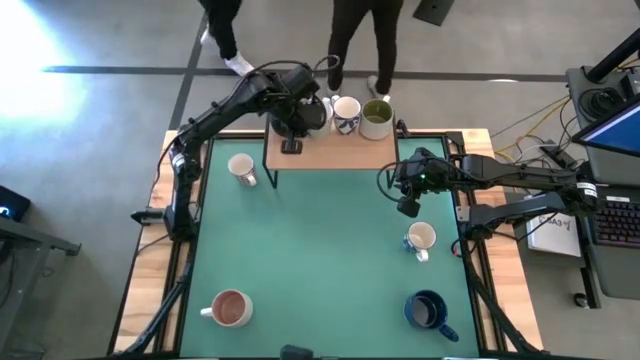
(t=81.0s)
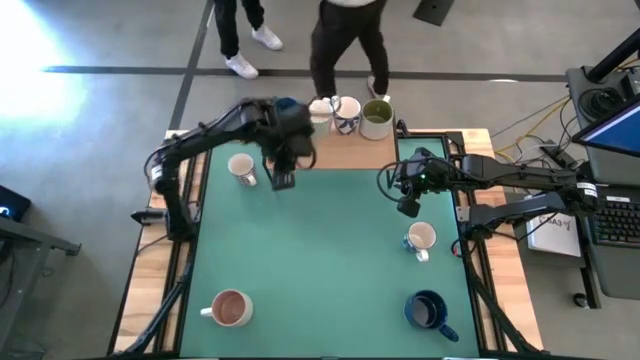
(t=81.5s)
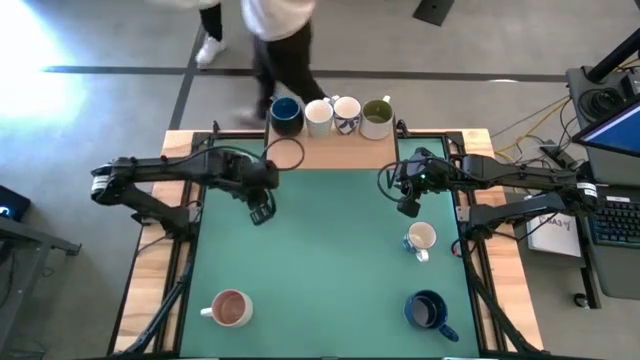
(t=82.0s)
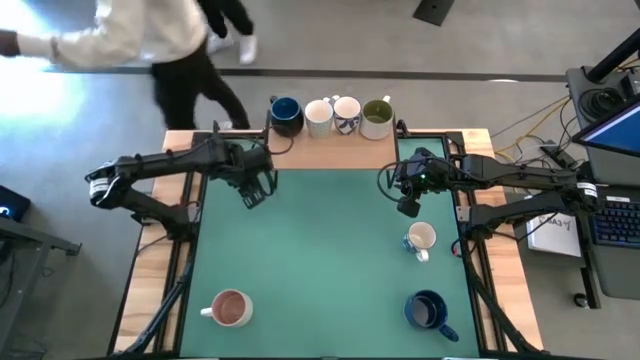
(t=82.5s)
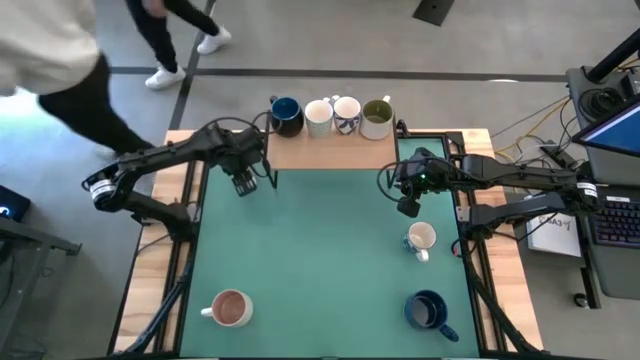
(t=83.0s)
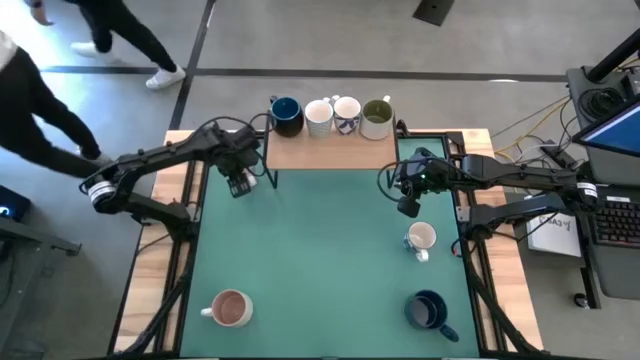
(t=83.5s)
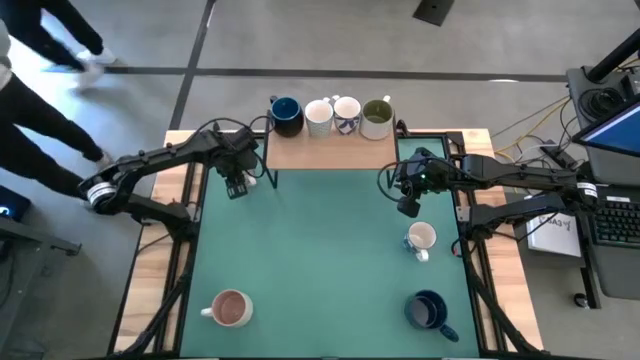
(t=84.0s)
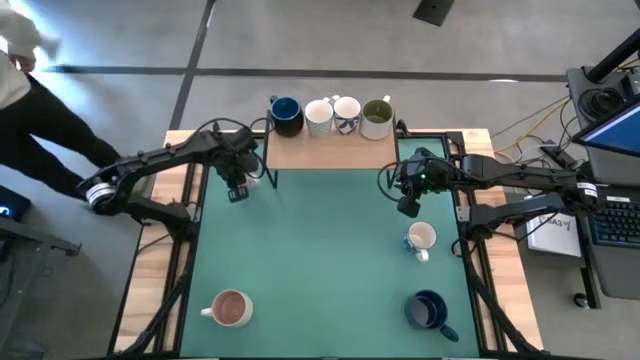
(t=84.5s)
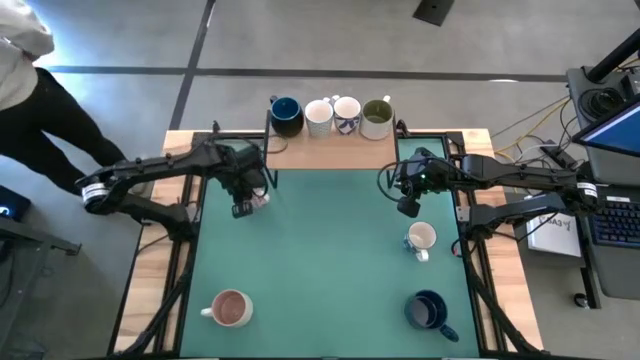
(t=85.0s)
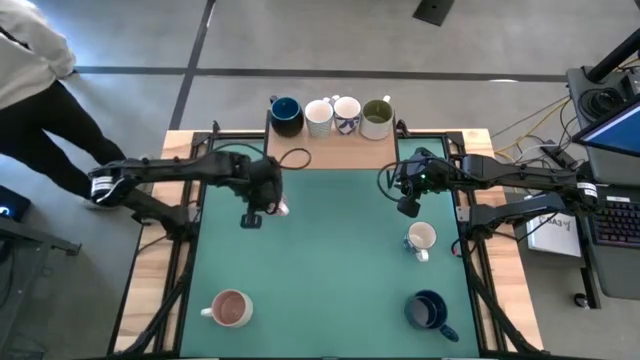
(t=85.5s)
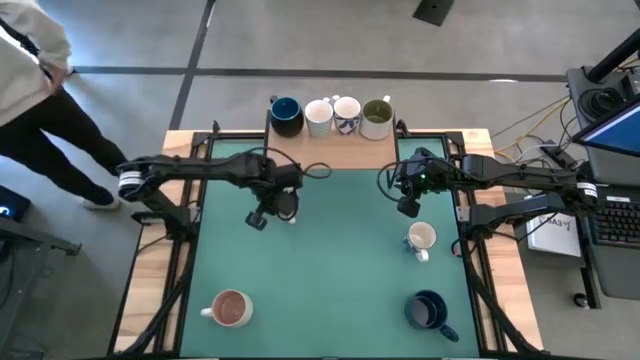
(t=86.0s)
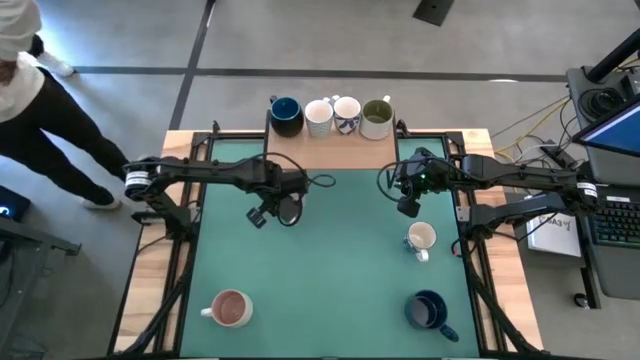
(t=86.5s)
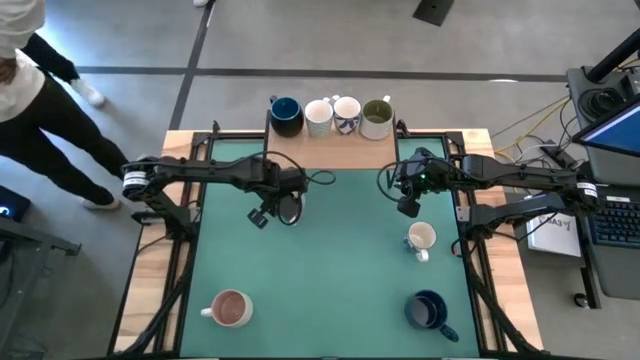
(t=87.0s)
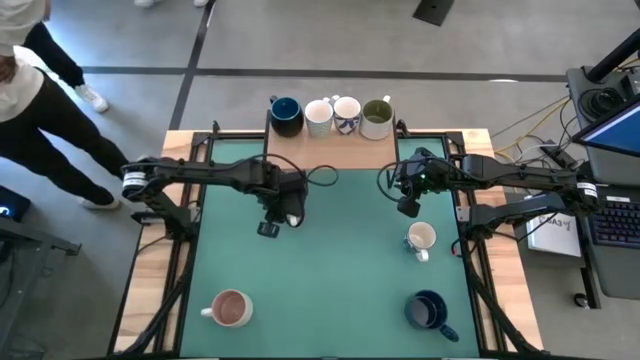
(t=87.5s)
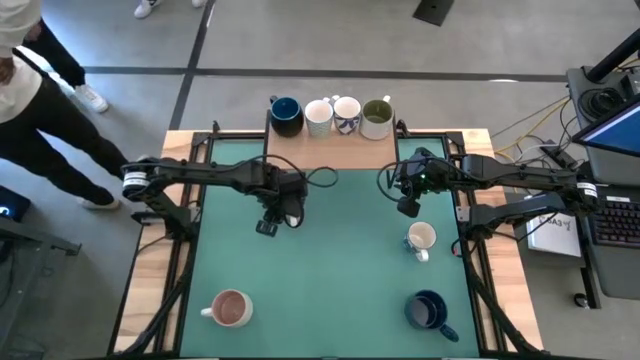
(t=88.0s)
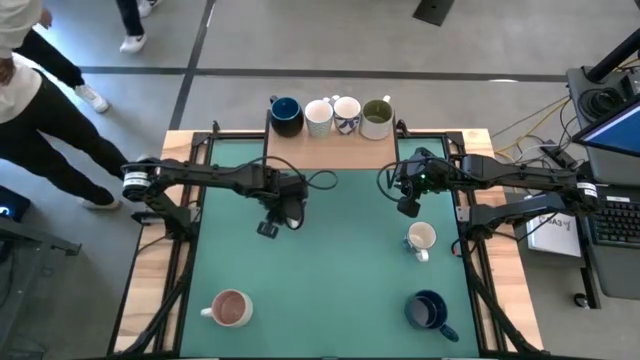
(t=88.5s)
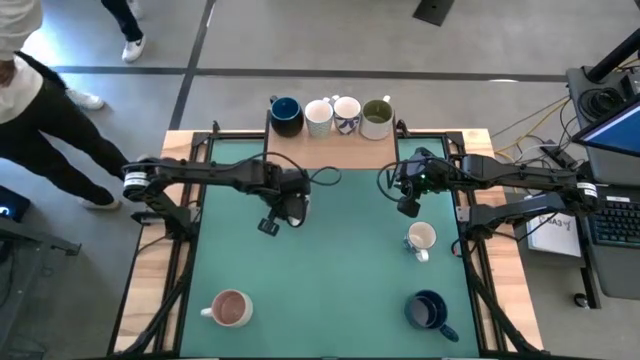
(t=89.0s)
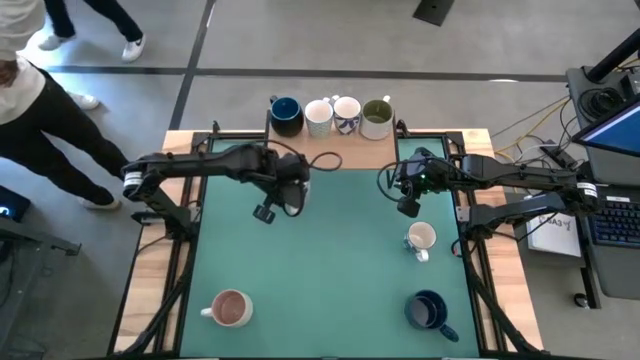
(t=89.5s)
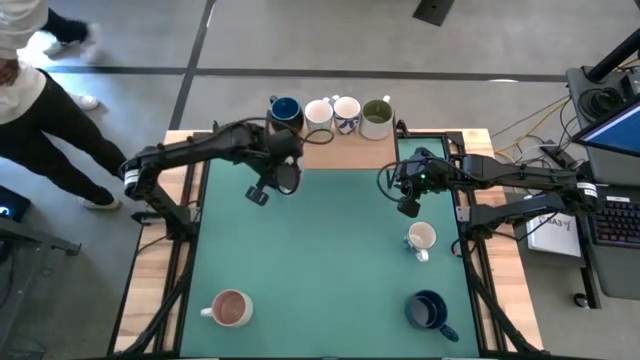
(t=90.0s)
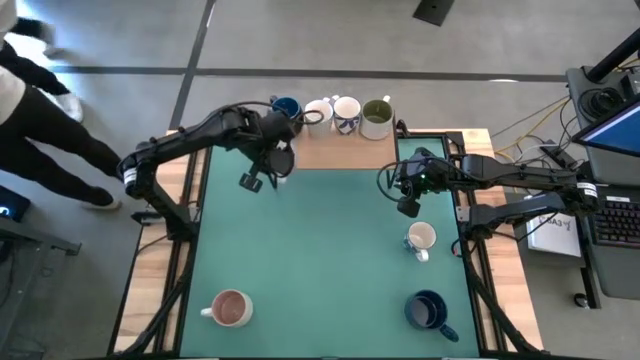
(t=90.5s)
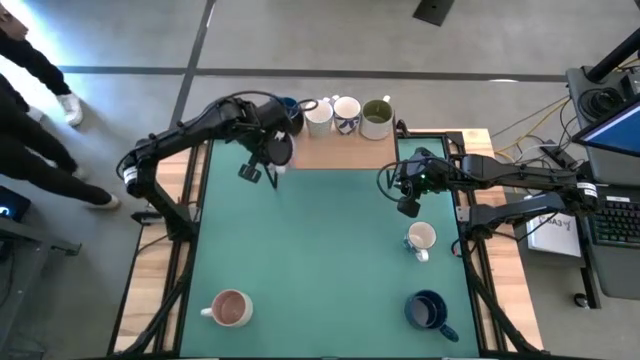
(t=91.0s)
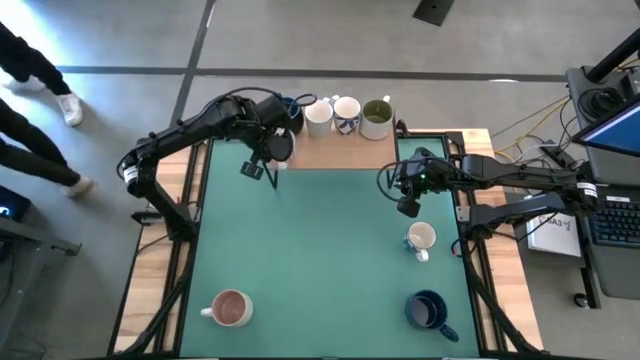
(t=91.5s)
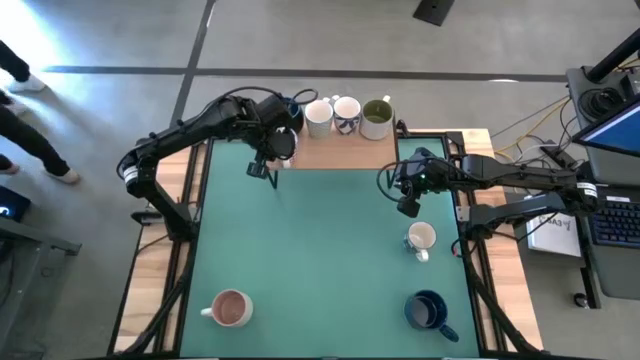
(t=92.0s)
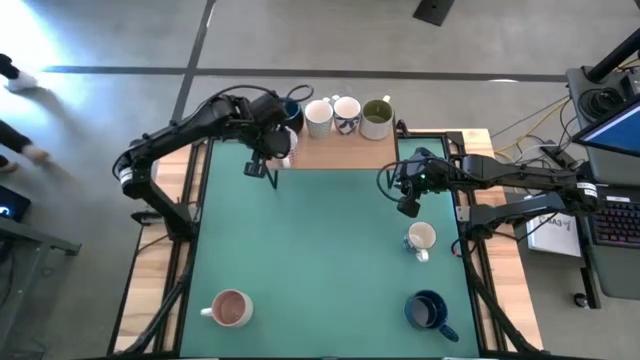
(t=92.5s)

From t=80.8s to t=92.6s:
Task: Place coffee mugs
Put the red mug on the shelf
